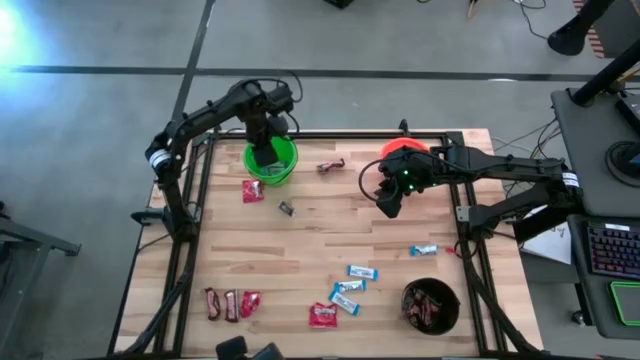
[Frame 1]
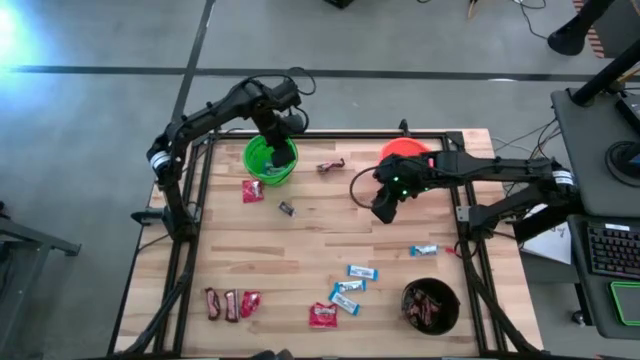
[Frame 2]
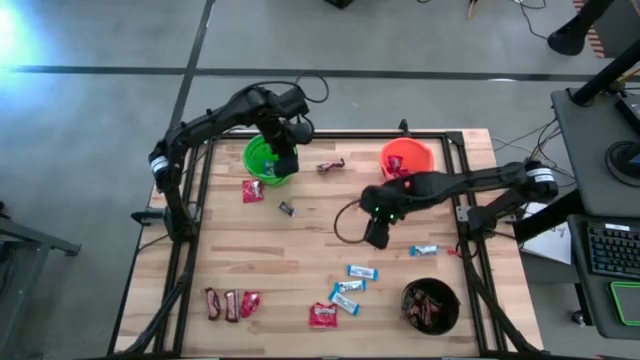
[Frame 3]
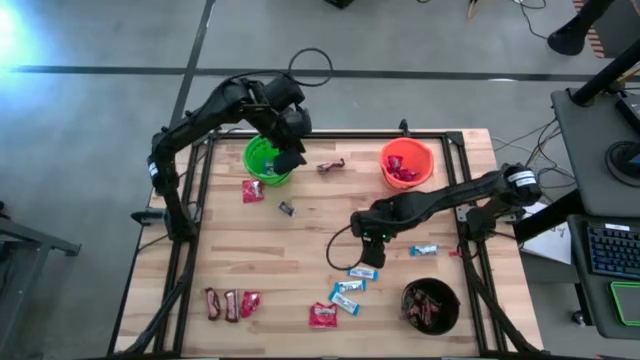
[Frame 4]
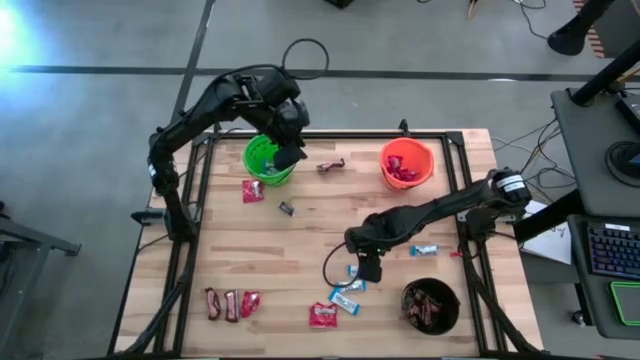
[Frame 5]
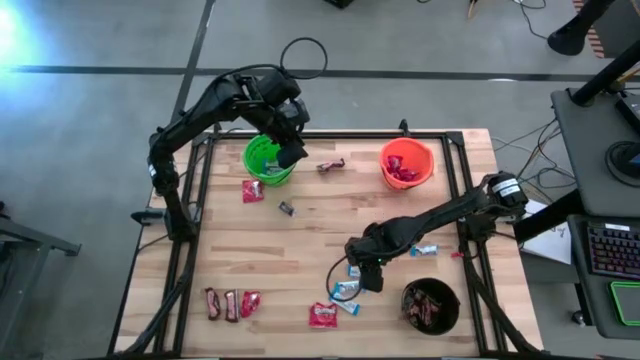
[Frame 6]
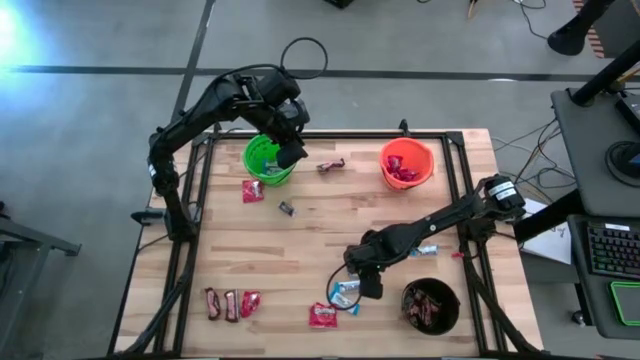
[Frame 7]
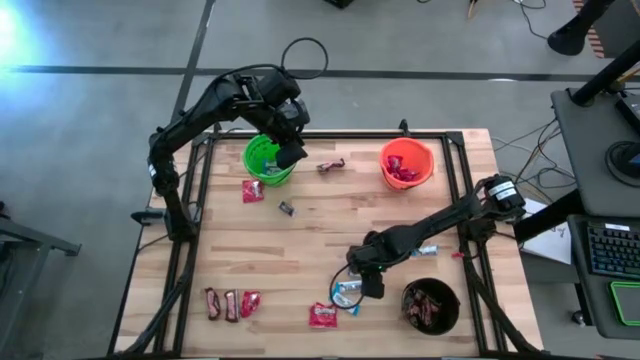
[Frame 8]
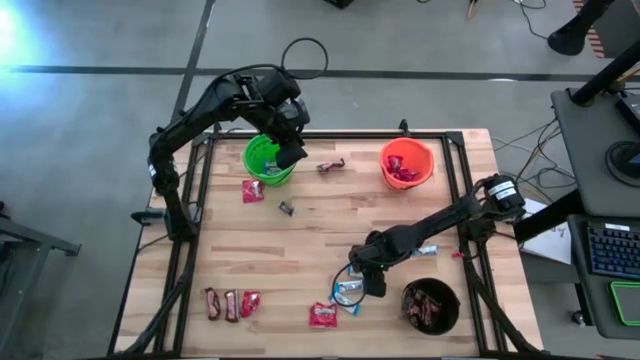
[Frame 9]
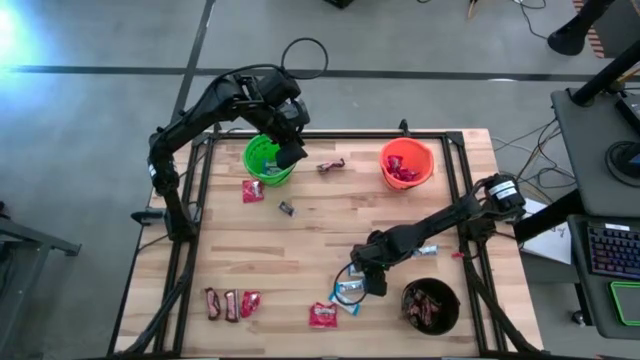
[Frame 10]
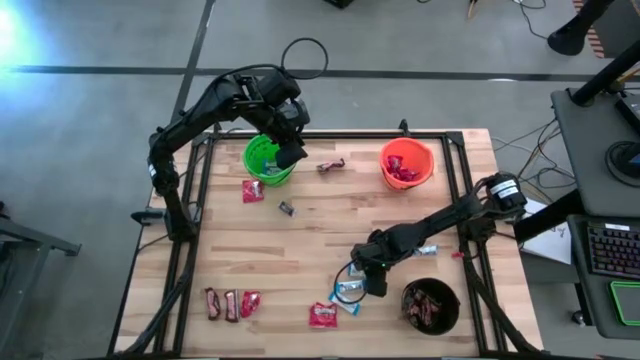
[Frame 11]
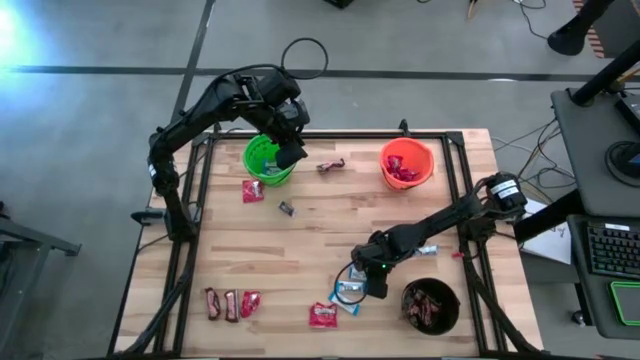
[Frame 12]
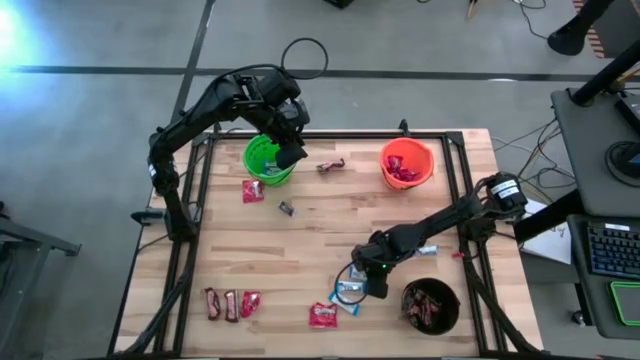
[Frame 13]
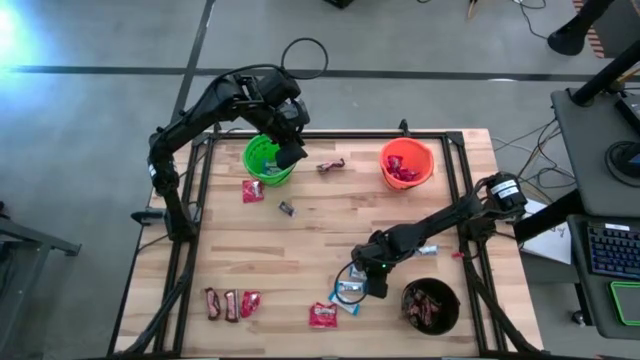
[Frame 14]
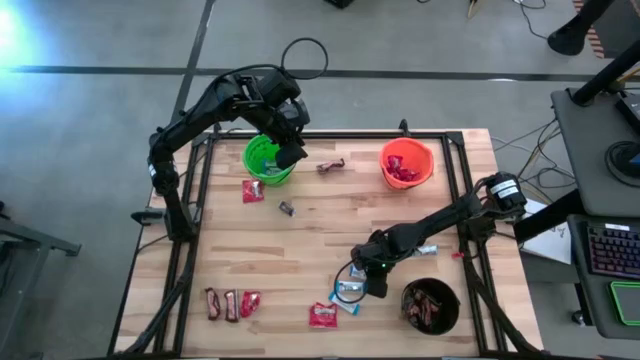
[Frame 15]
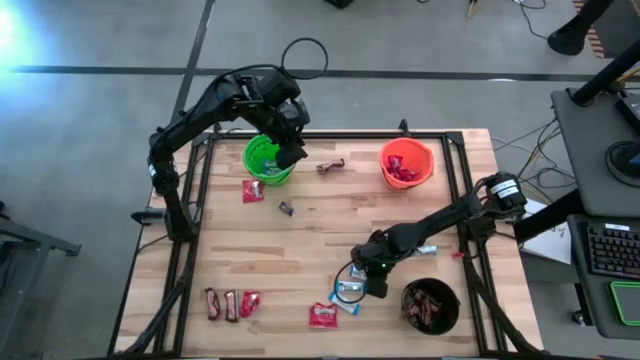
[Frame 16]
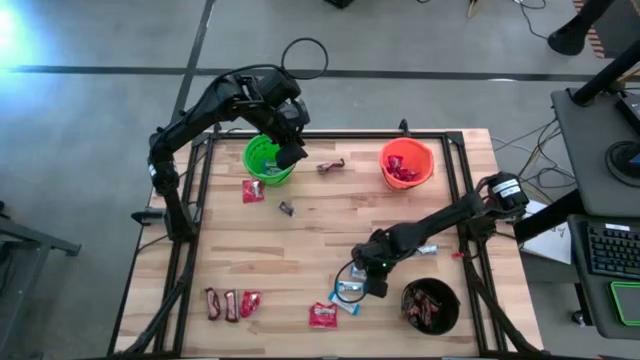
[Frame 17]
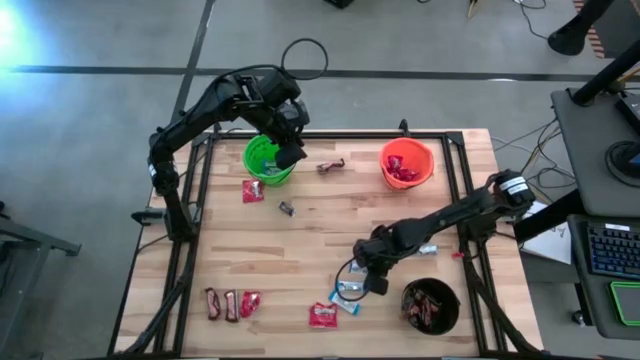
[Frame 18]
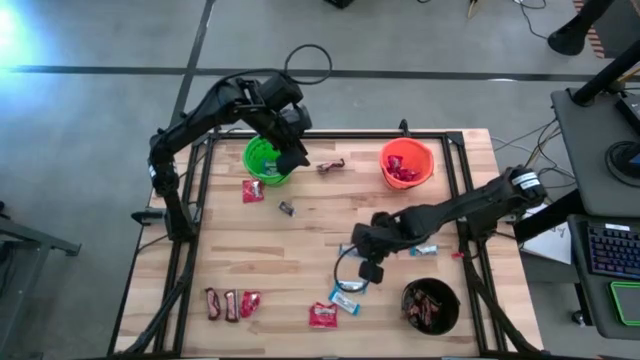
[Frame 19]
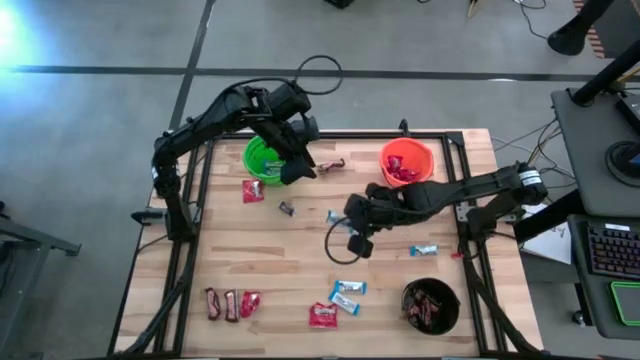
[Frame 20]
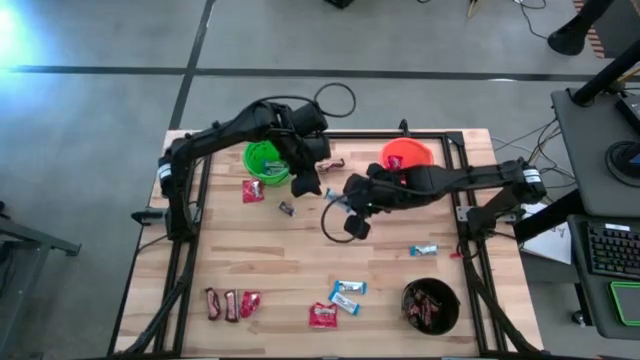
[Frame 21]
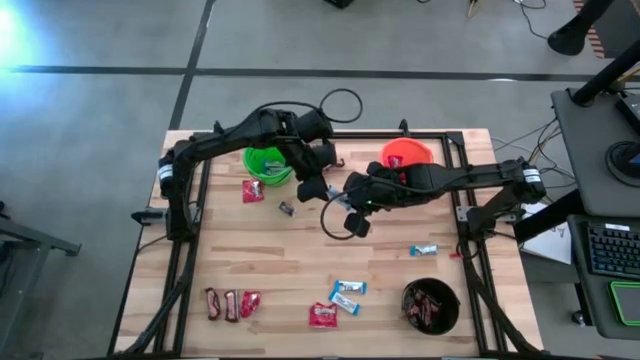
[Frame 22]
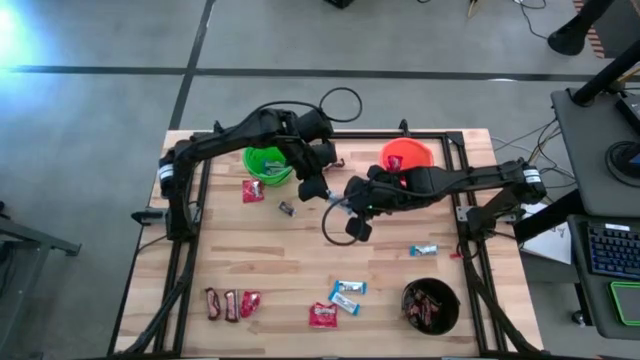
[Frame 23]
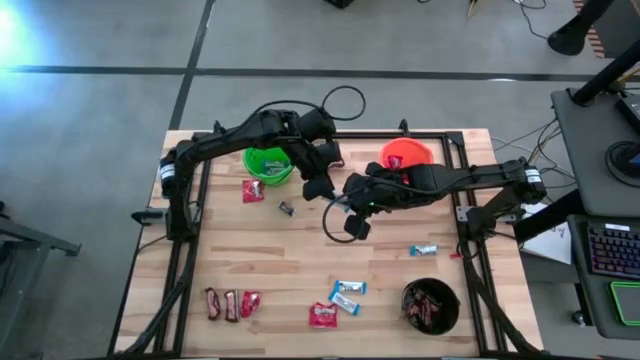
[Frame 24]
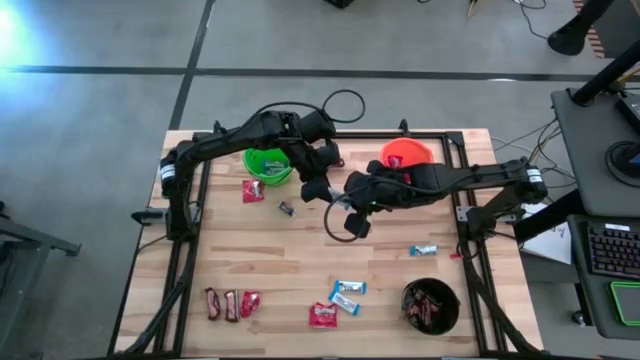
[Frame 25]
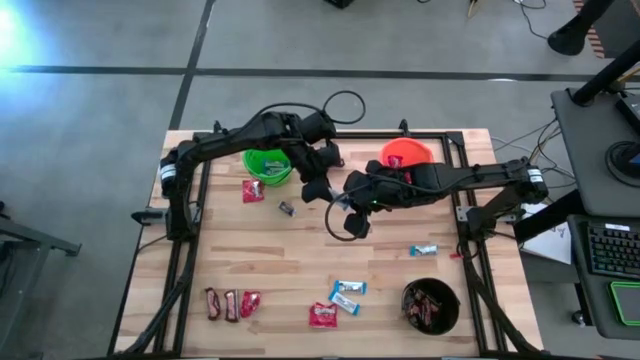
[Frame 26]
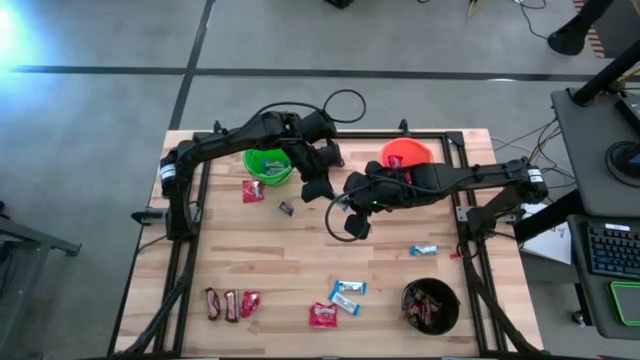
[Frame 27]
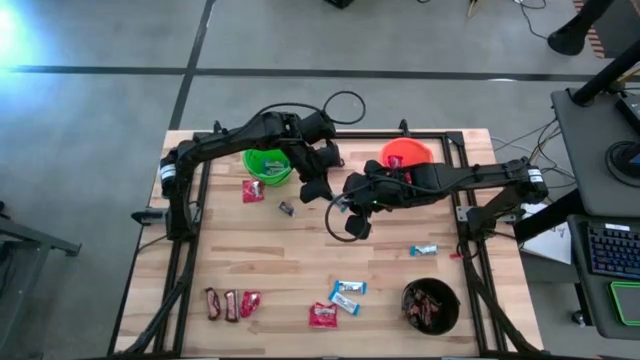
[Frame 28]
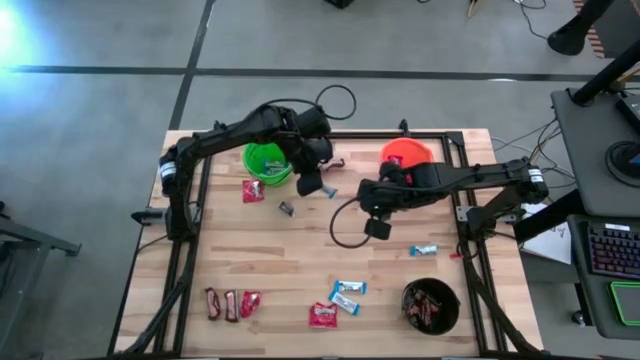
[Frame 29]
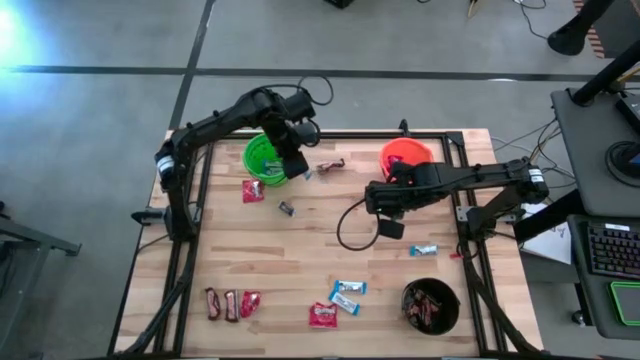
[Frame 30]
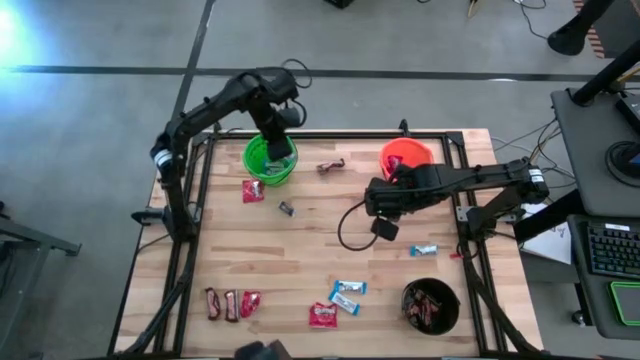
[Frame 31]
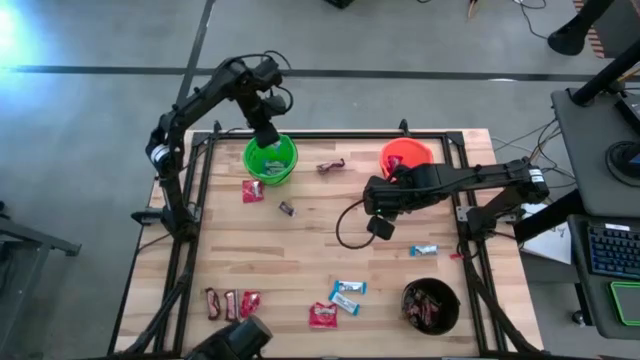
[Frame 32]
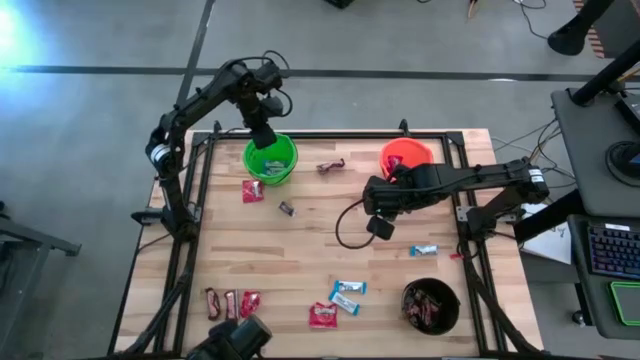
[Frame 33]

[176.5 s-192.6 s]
Task: Sort candy
Put the white candy into the green bucket

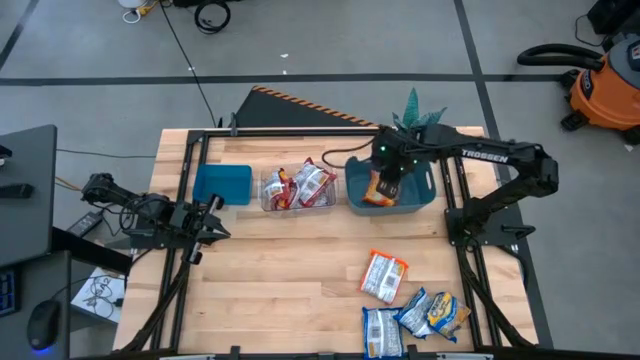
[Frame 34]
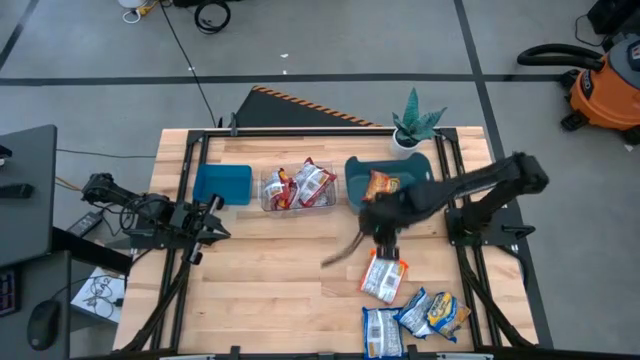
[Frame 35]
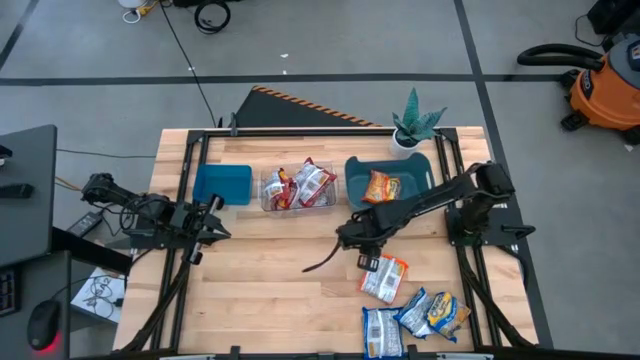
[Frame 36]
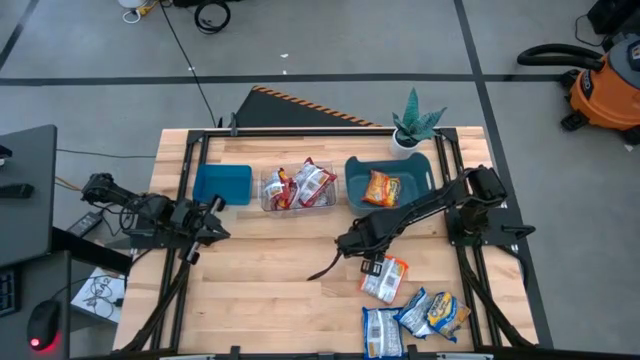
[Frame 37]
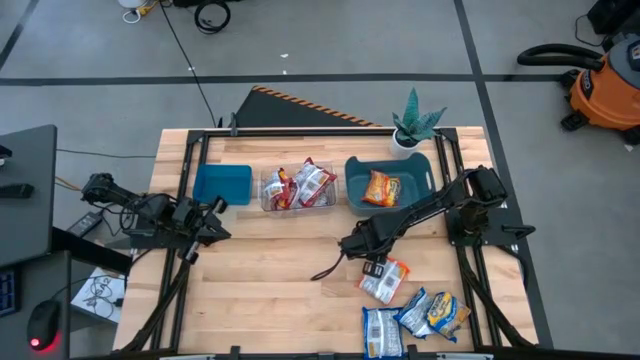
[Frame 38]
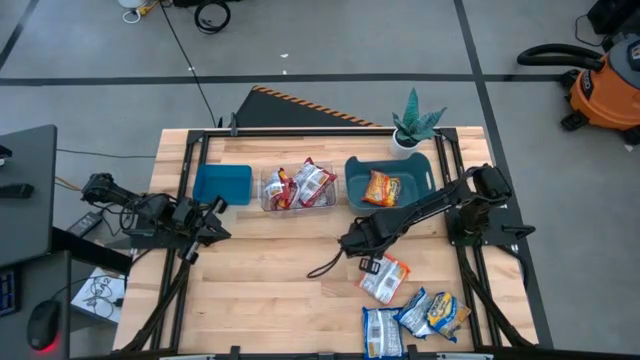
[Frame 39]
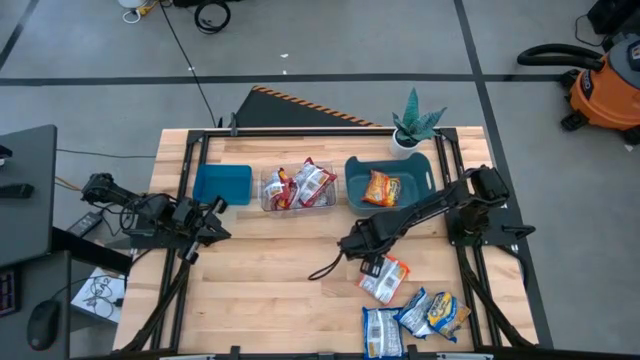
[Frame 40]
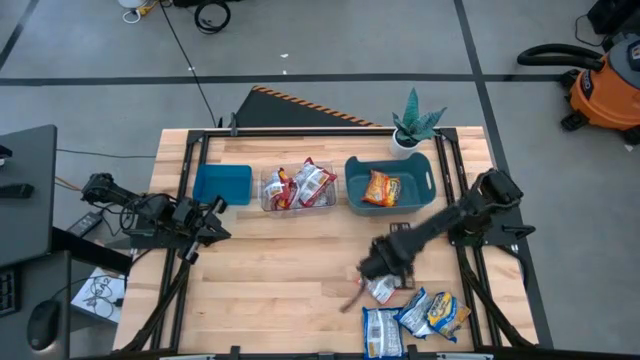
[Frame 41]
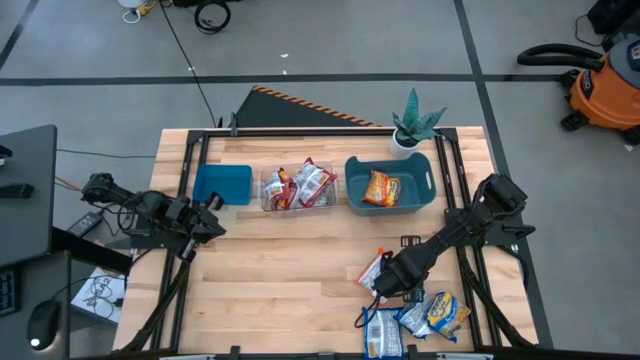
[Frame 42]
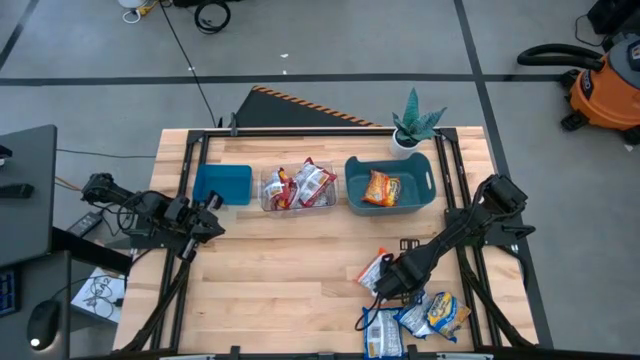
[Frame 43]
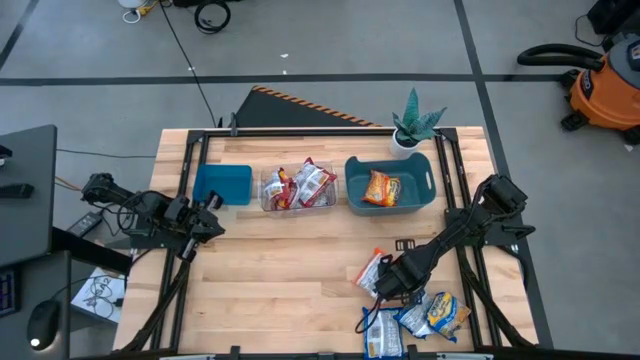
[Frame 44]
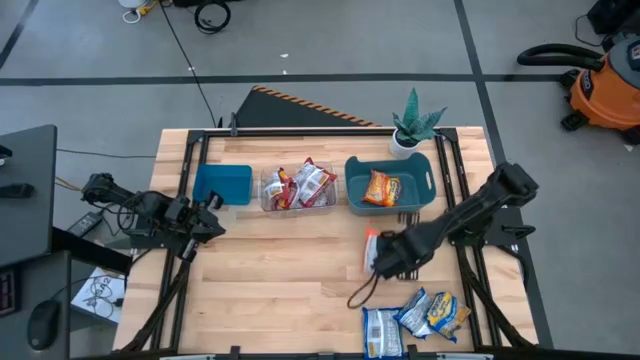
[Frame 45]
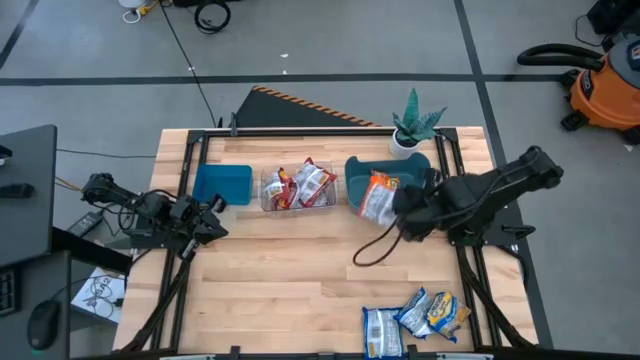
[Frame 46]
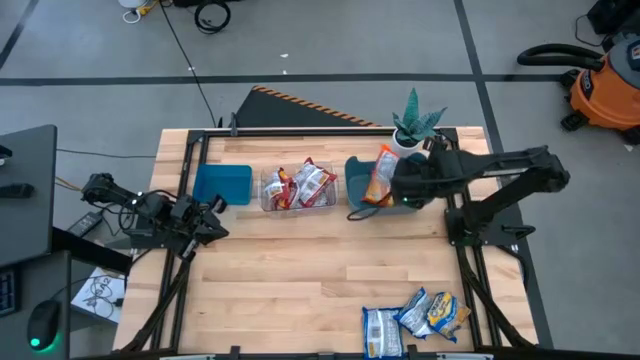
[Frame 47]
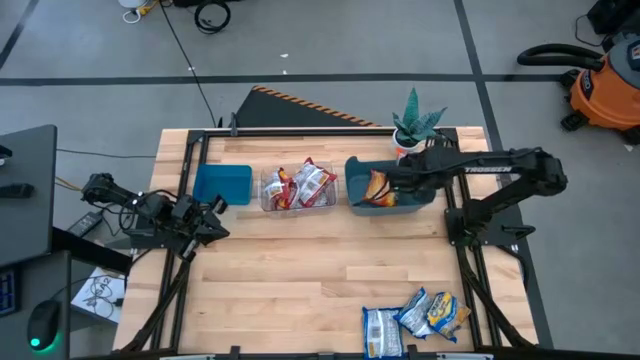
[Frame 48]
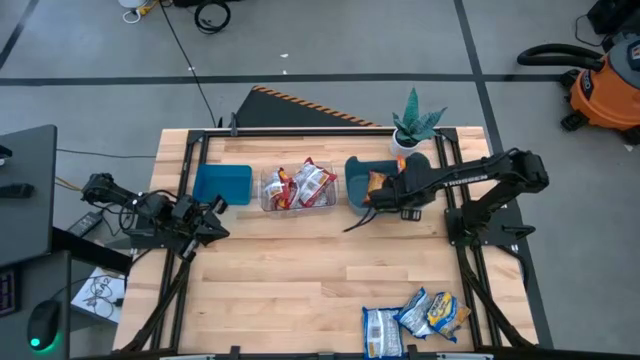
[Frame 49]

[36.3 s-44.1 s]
Task: Sort Maruchan noodles
Put the orange noodle pack into the green bin
